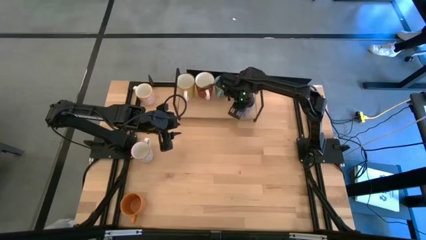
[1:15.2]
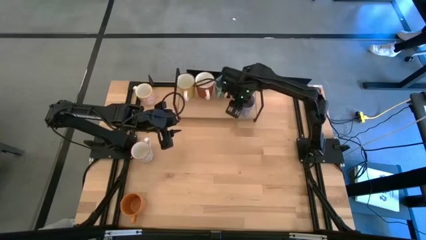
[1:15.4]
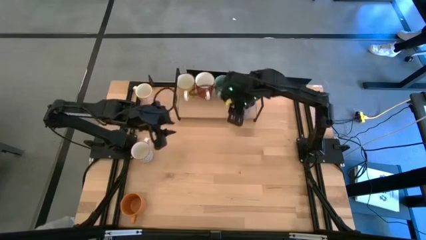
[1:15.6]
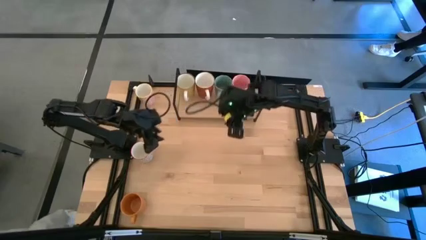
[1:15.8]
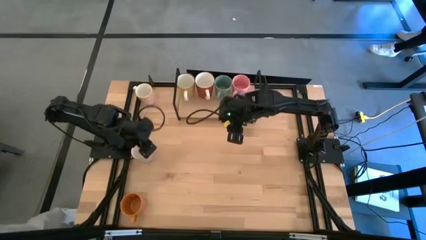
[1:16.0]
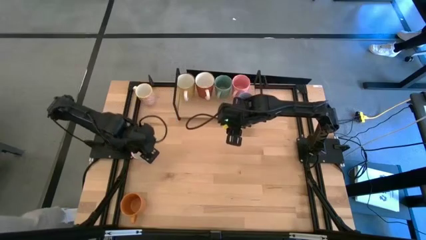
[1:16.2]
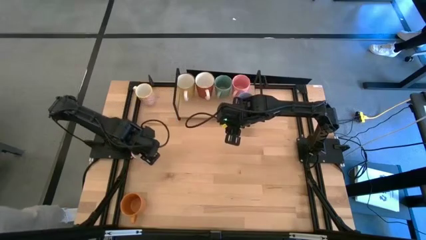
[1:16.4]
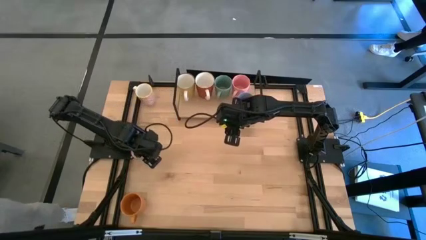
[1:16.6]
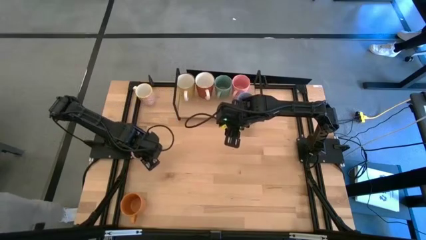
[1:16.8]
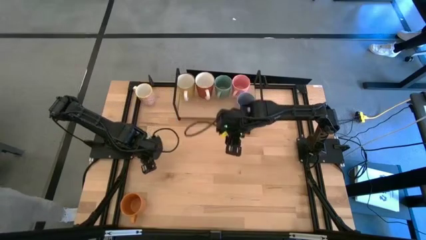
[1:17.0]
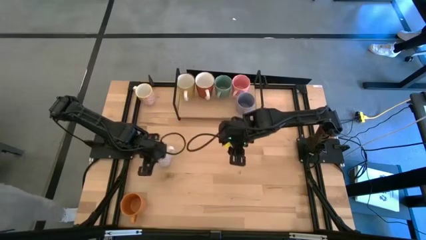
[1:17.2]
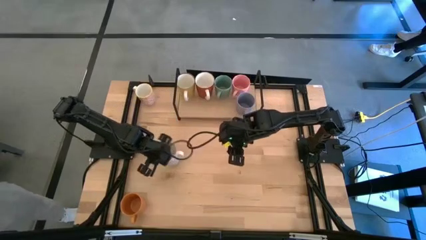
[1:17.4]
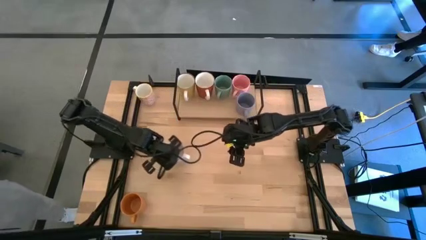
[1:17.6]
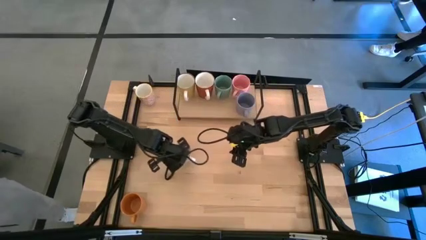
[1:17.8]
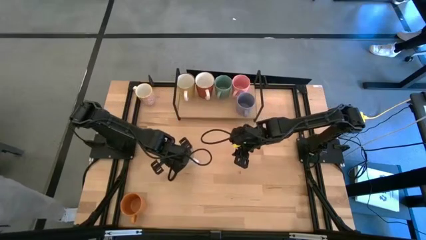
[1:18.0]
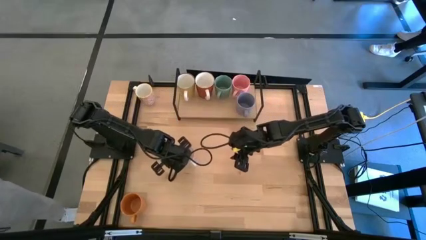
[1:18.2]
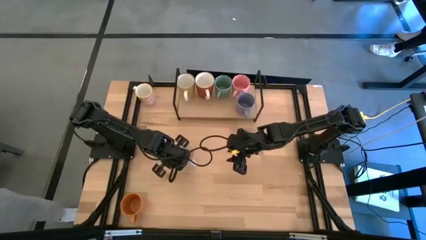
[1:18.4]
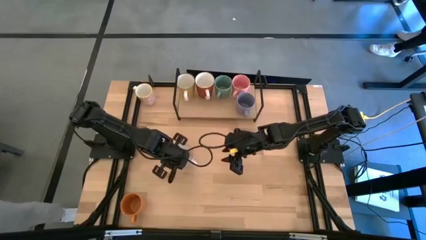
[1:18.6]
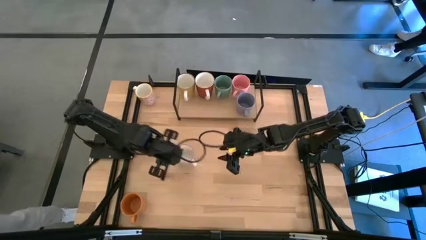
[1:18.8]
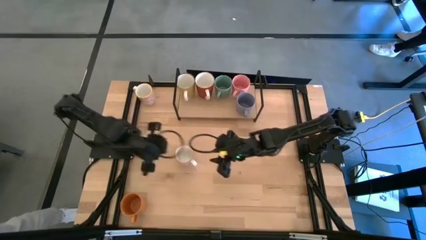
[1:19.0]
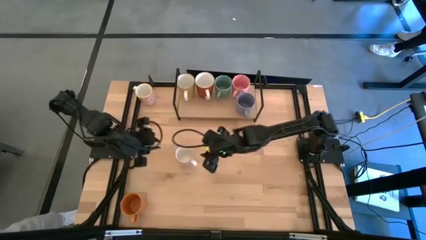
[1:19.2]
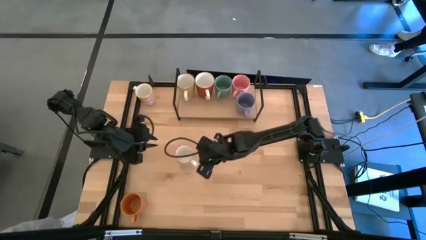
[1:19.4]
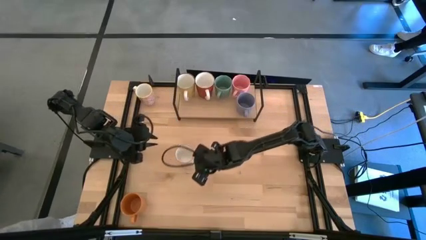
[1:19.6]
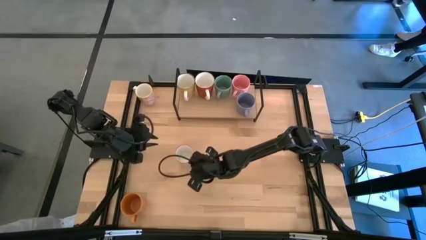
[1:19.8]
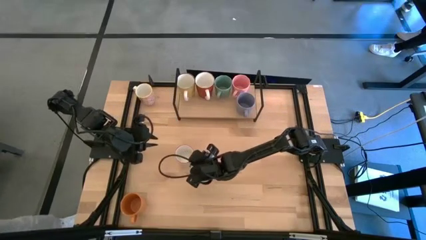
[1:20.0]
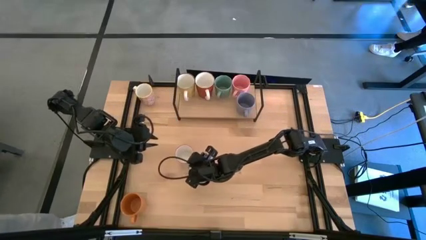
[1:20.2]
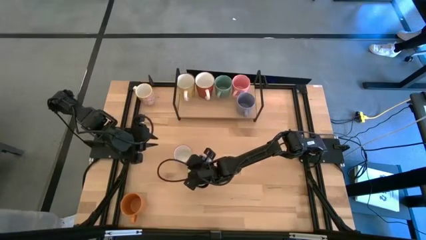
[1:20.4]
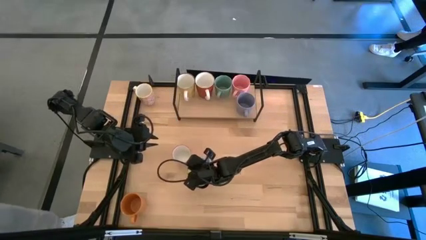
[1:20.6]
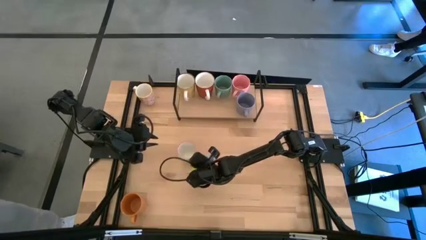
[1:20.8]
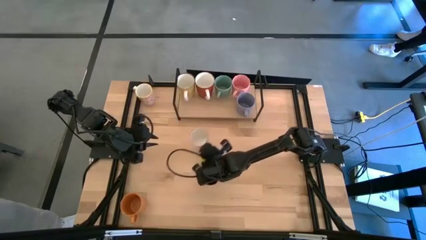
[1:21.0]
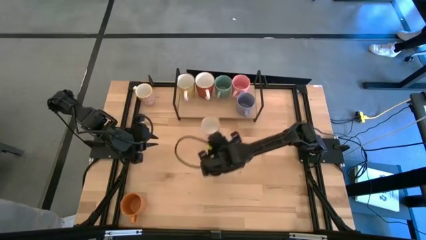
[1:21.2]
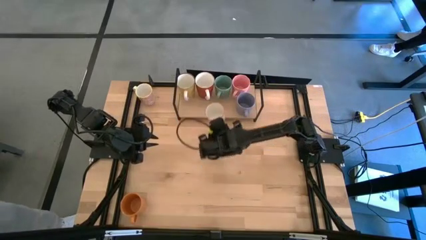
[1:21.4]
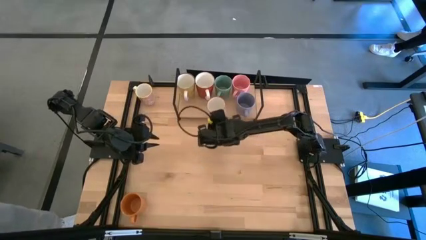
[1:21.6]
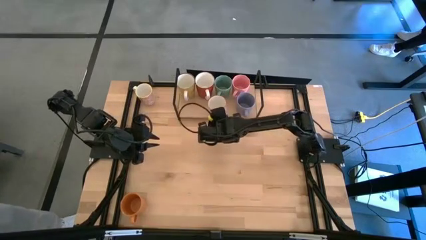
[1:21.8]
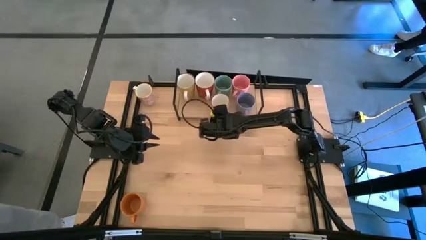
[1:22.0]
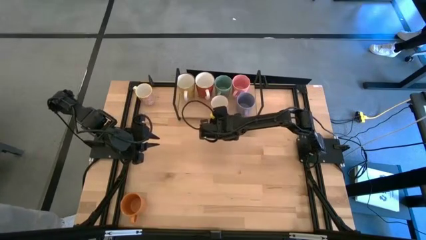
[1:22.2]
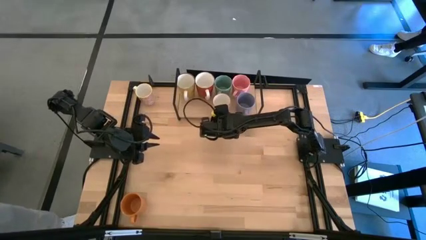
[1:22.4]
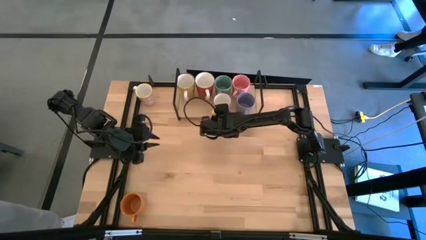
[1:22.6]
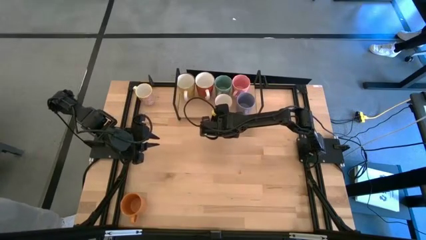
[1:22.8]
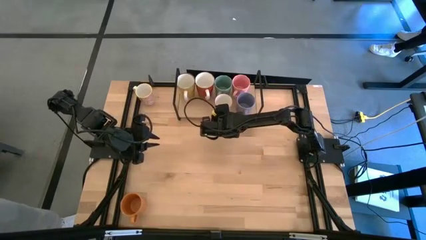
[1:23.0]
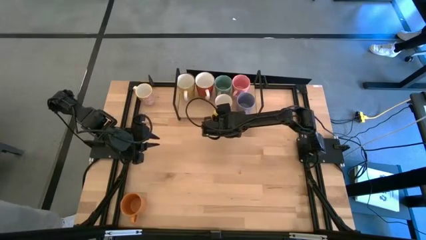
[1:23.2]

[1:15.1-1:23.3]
Task: Place coffee mugs
Put the gray patterned mug on the shelf

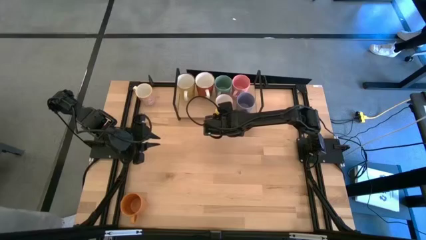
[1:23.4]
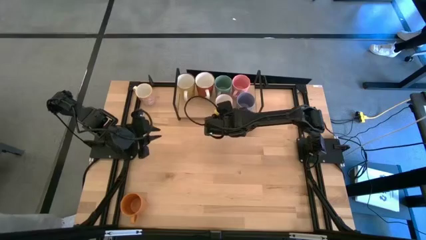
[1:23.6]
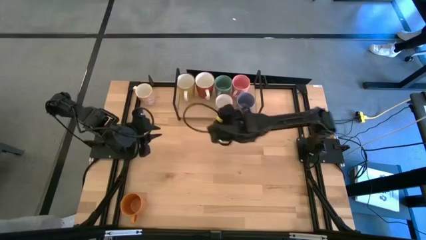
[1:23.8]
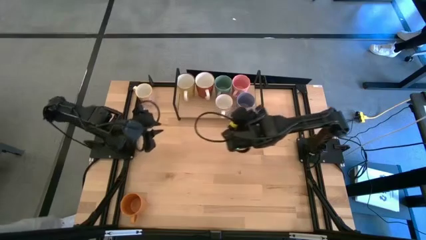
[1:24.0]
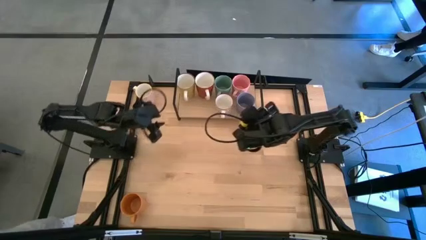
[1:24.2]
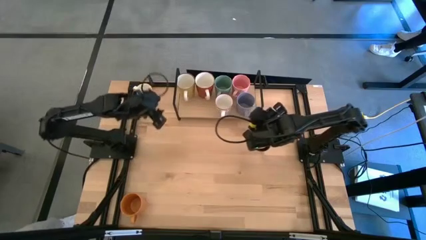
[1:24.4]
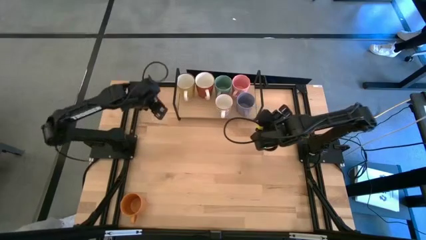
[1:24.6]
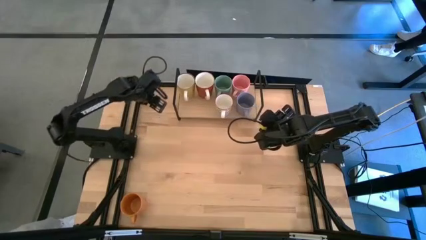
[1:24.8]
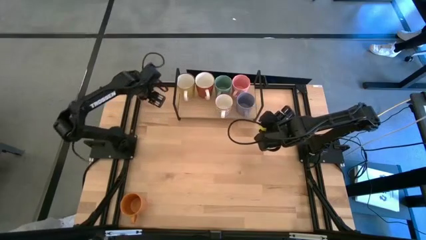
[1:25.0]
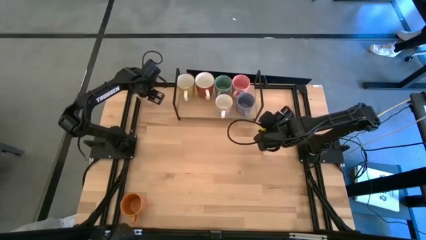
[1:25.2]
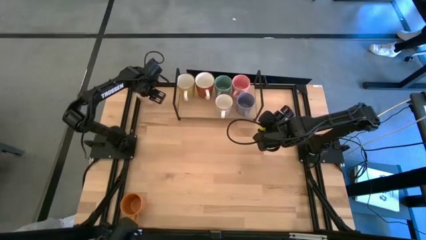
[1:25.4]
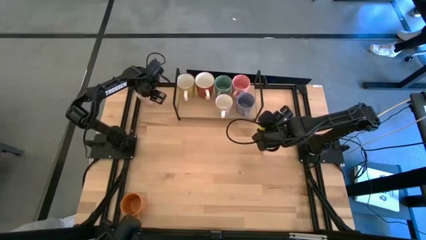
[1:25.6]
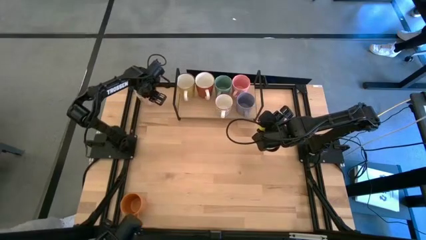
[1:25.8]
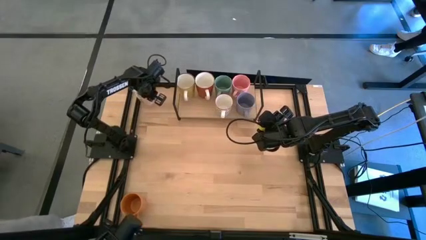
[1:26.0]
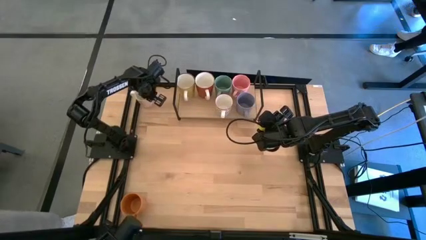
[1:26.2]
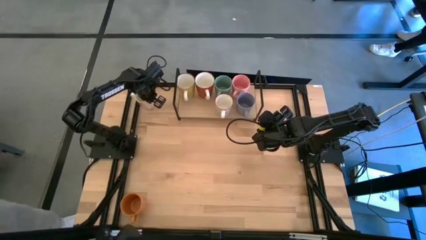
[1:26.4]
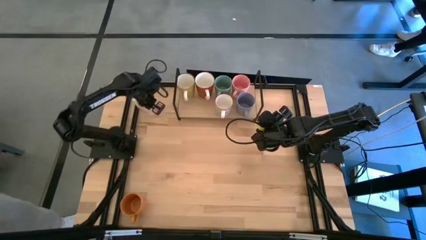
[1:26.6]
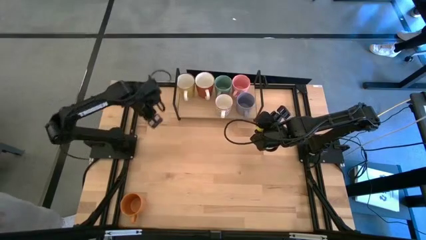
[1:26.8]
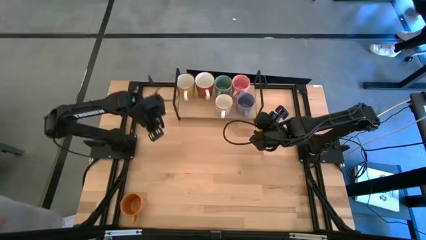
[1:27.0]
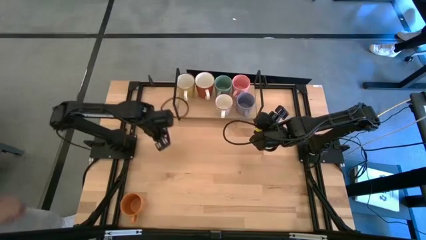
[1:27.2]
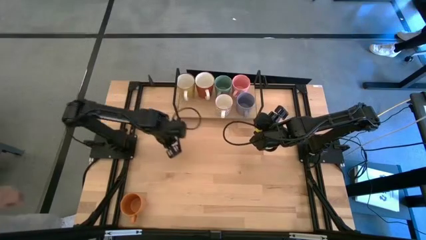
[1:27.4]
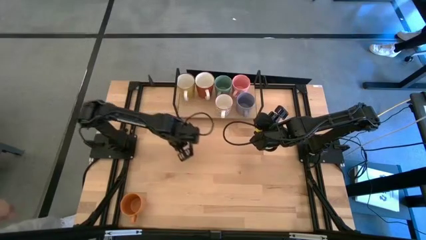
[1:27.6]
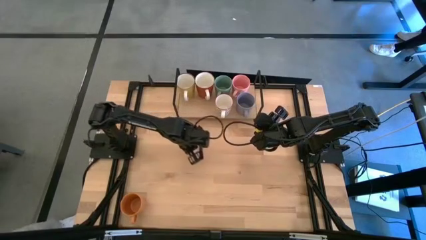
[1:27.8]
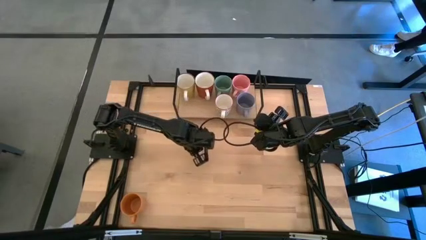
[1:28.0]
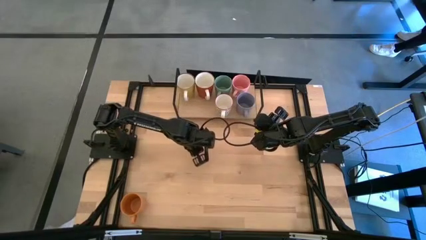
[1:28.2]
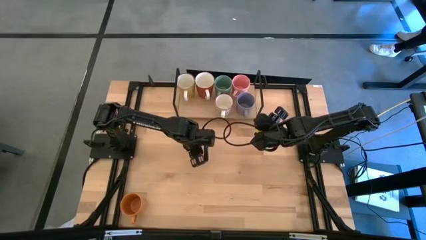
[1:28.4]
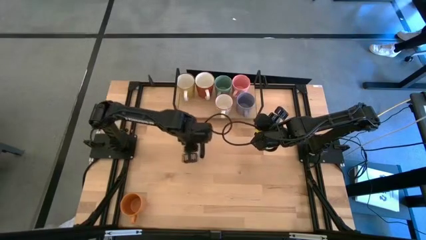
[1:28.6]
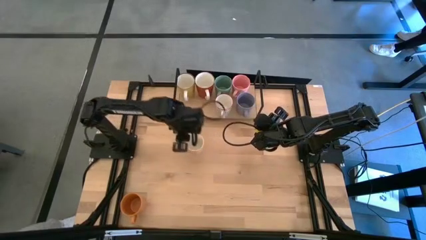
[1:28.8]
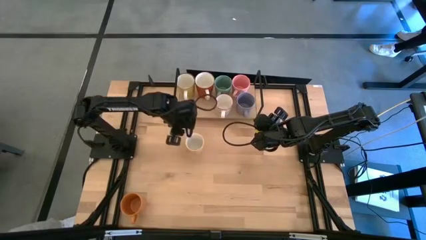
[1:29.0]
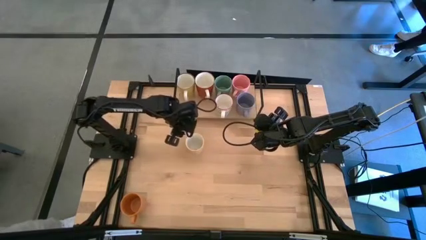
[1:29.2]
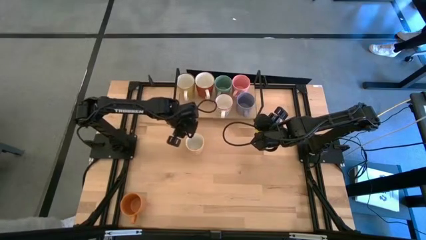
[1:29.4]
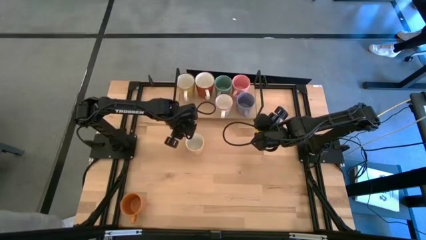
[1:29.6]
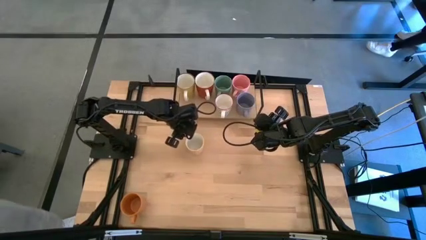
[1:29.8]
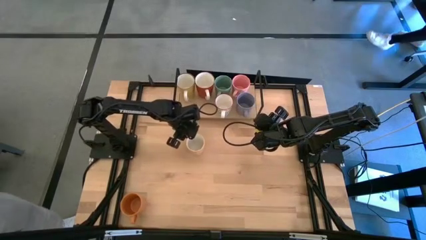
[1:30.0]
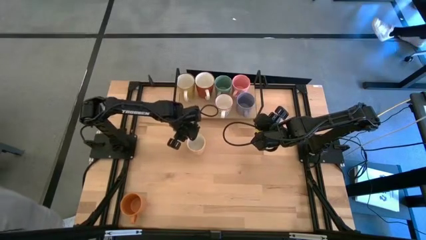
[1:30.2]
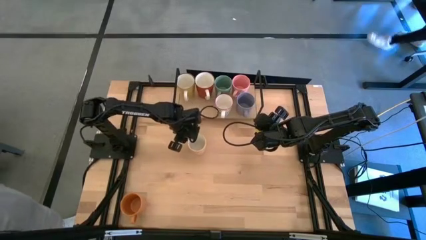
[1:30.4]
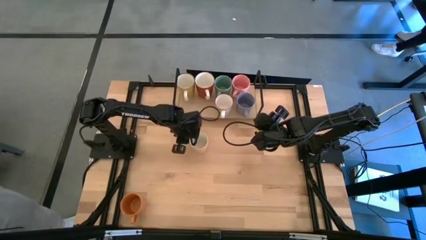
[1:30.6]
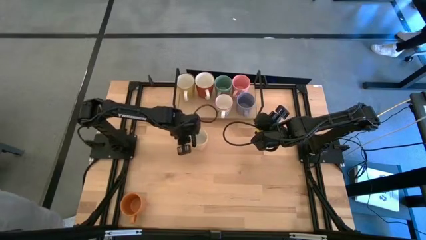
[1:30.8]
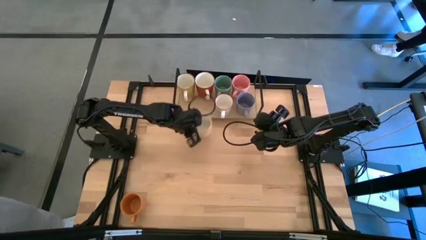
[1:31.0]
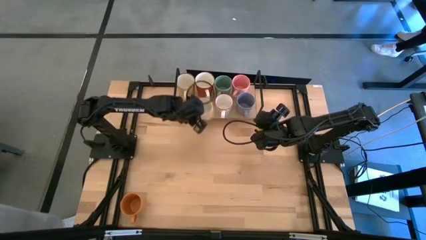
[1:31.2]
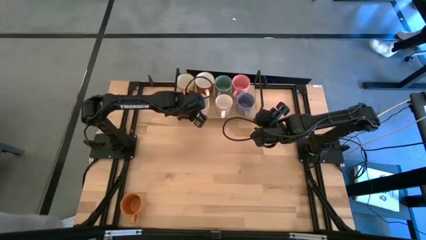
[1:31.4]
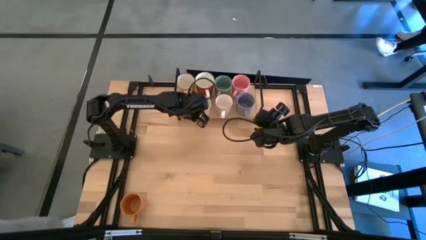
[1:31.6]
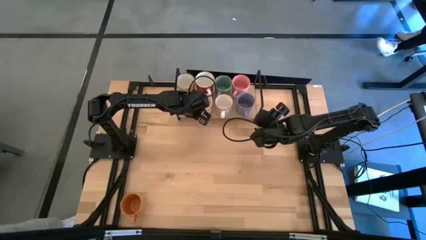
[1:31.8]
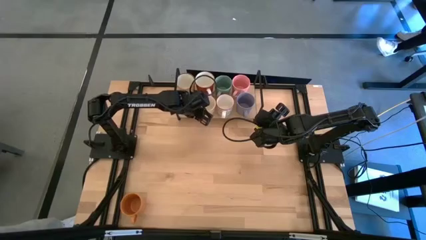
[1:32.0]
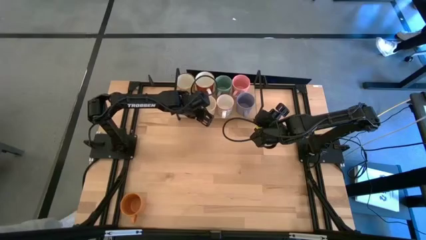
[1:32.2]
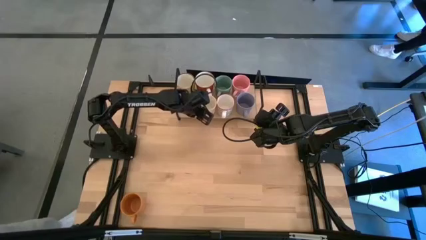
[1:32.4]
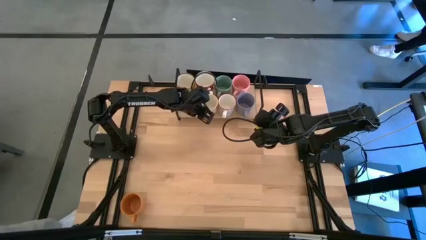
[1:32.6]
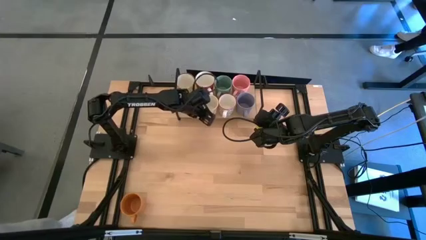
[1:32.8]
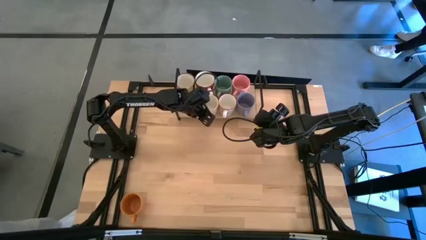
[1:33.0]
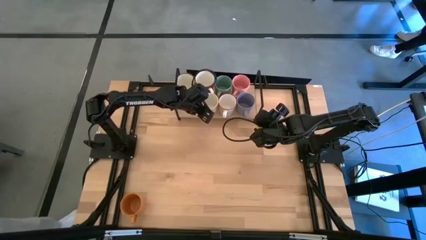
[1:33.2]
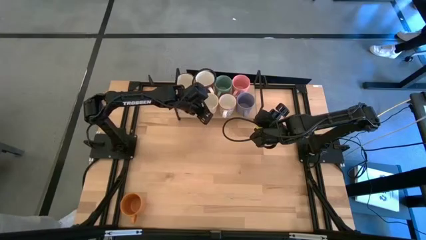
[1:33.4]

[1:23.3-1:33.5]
Put the red patterned mug on the shelf
